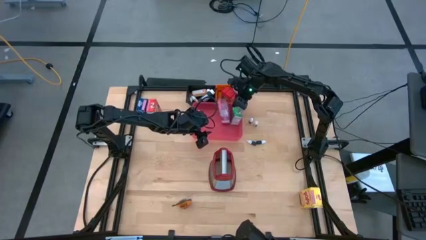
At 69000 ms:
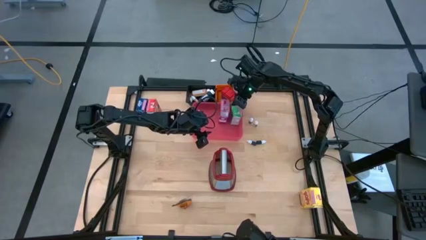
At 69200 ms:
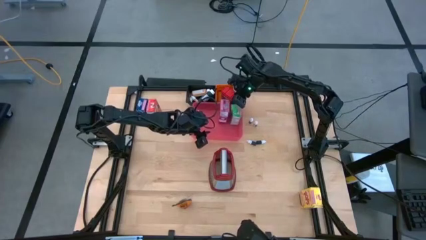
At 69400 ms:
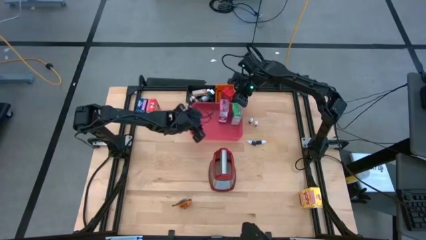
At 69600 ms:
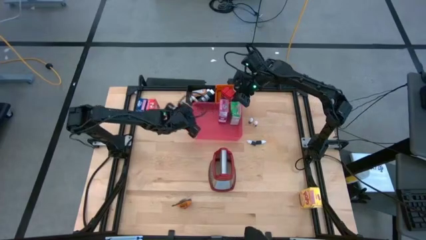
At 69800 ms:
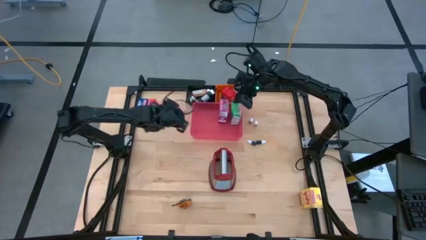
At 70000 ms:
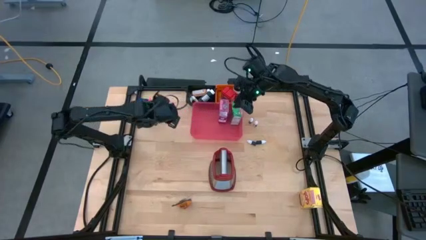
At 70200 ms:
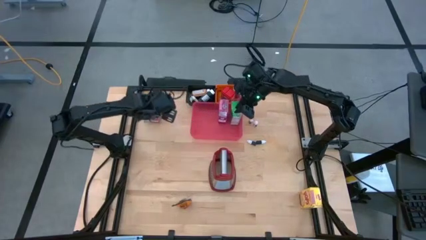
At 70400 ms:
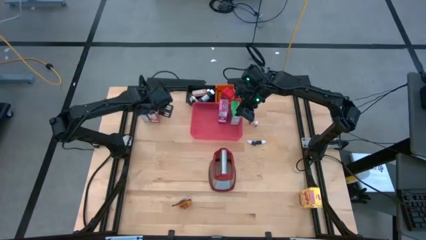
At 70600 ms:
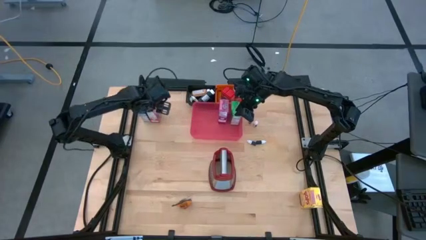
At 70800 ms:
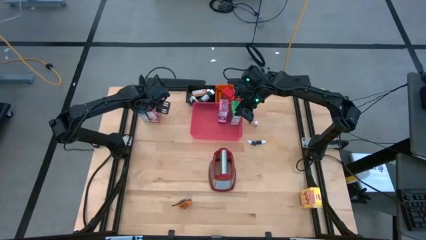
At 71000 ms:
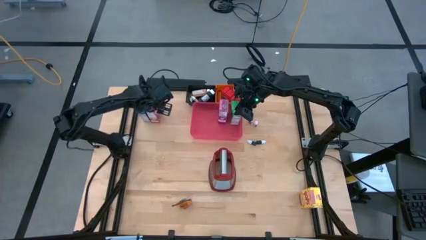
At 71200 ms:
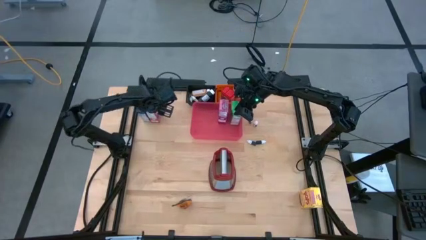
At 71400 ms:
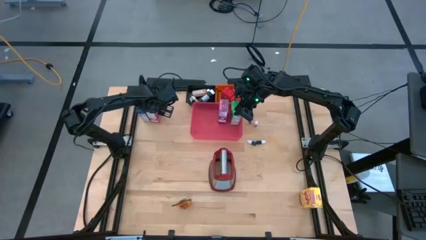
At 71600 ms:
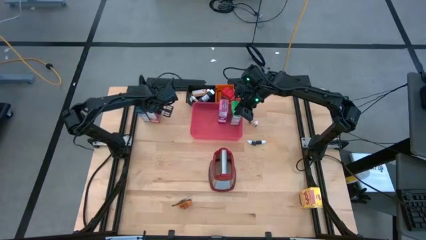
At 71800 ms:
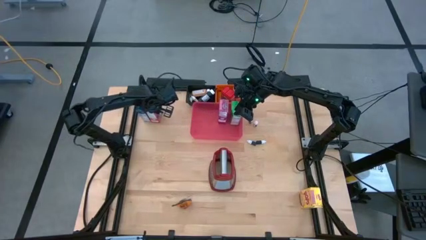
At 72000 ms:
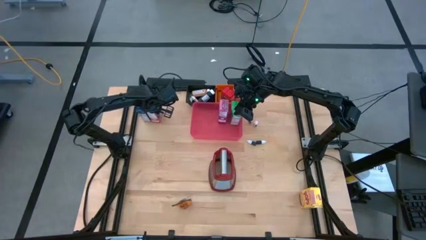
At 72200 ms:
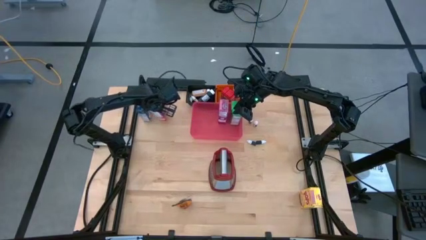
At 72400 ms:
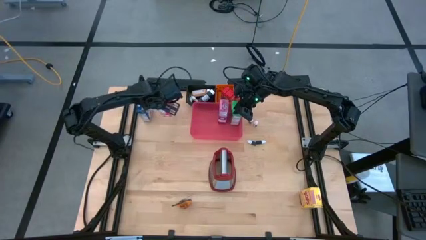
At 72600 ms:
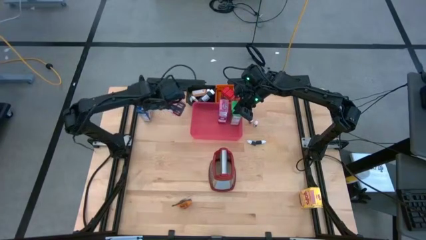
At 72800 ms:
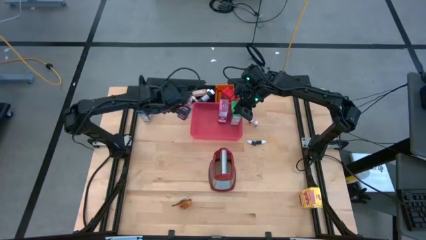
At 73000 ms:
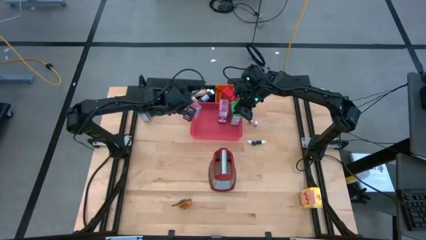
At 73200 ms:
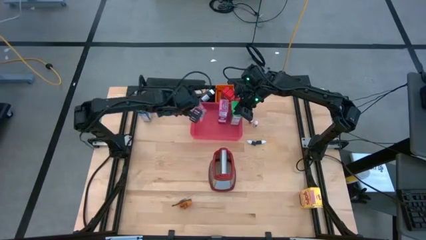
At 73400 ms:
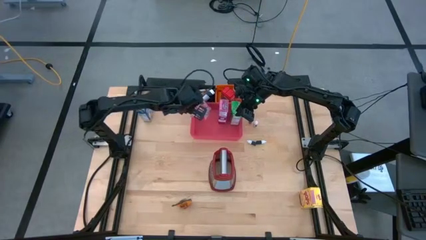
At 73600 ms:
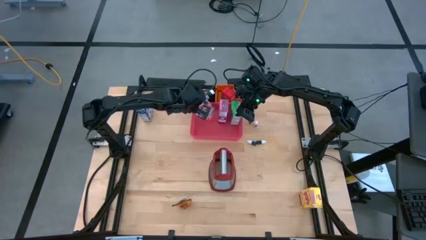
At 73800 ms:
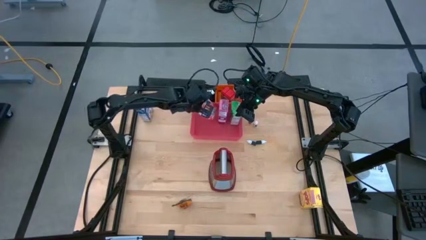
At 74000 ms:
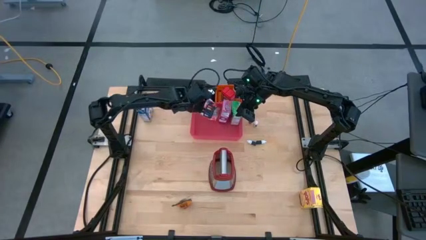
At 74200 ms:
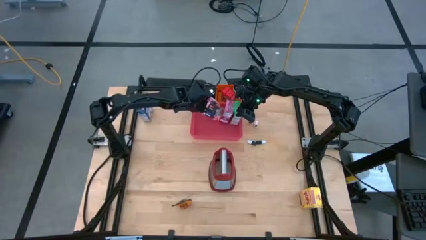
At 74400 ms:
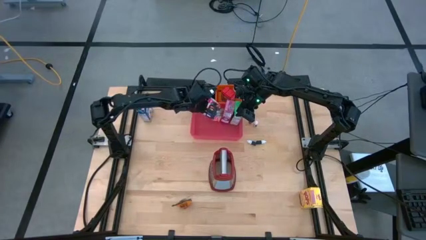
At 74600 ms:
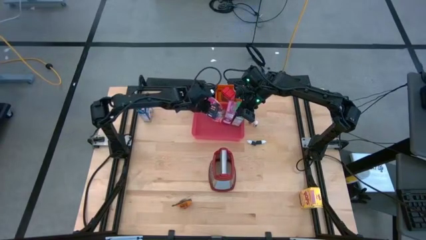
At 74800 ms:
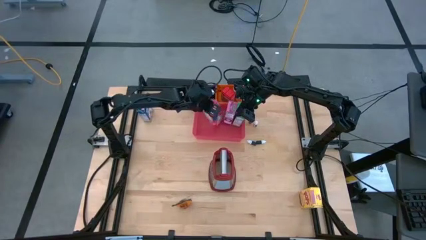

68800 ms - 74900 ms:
Task: Pick & Place Kitchen Items
Put the red cereal box into the pink bin

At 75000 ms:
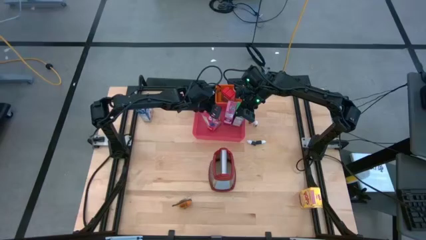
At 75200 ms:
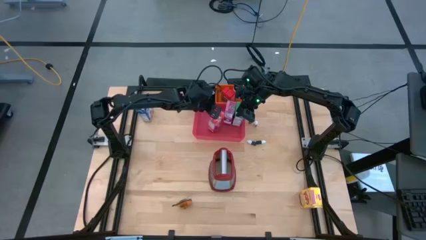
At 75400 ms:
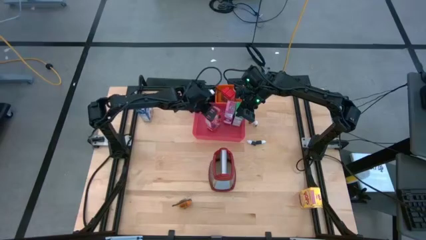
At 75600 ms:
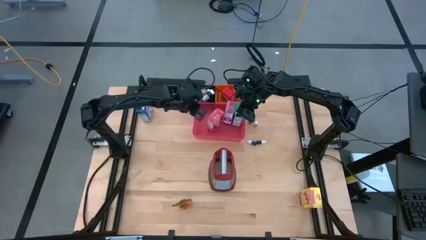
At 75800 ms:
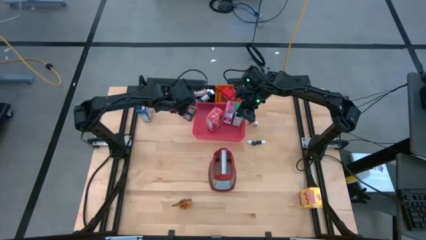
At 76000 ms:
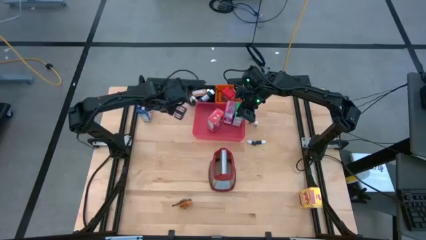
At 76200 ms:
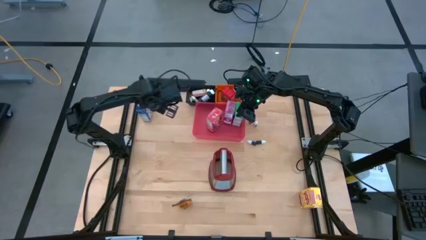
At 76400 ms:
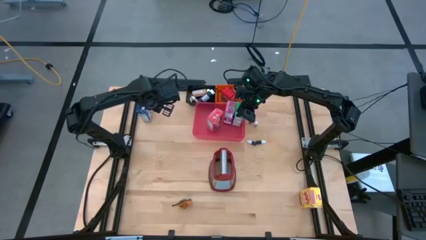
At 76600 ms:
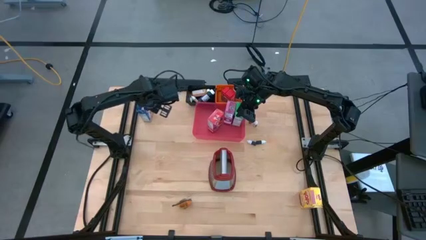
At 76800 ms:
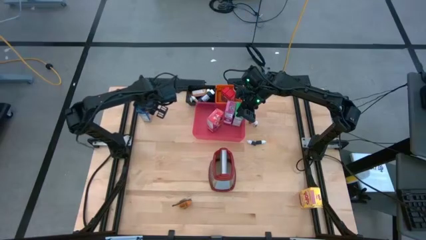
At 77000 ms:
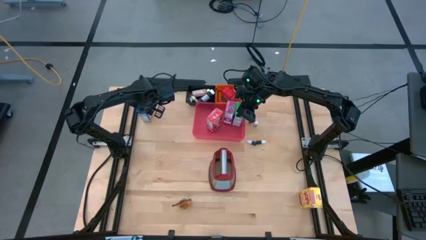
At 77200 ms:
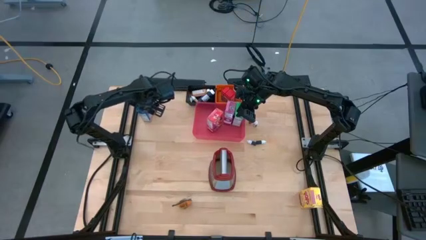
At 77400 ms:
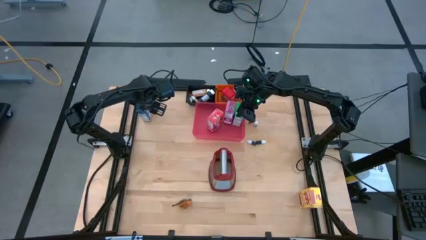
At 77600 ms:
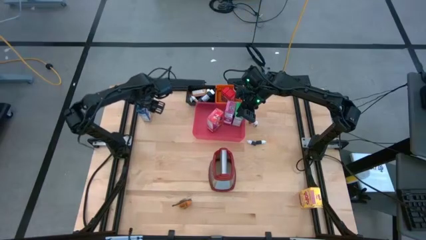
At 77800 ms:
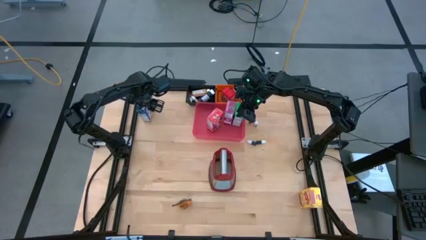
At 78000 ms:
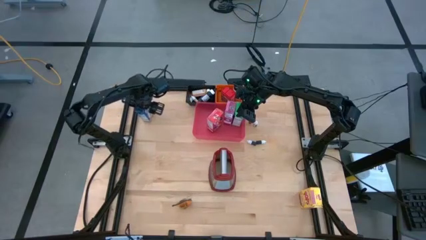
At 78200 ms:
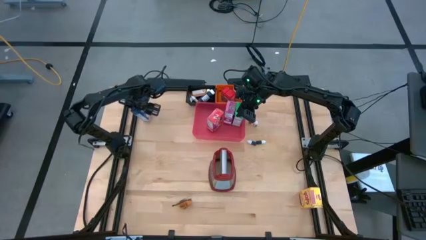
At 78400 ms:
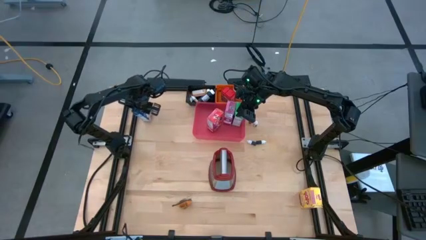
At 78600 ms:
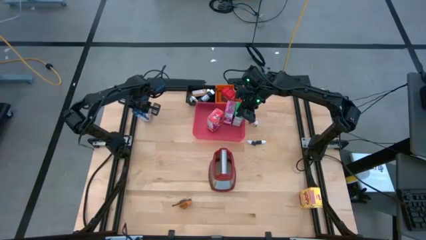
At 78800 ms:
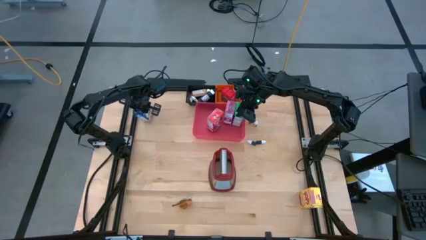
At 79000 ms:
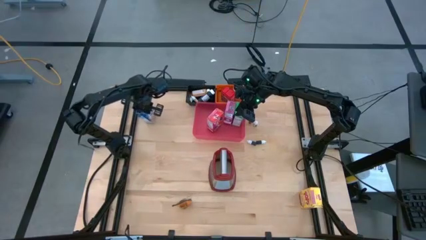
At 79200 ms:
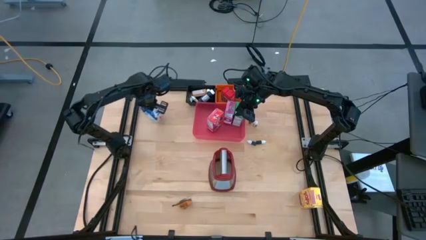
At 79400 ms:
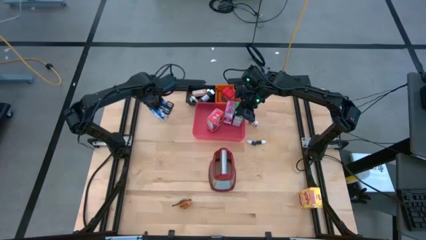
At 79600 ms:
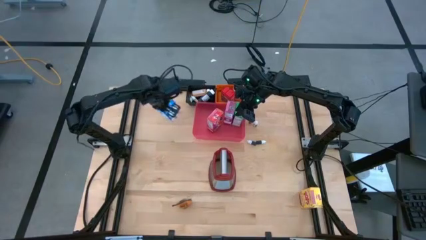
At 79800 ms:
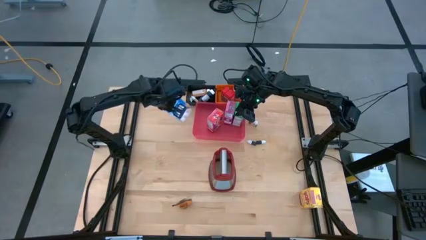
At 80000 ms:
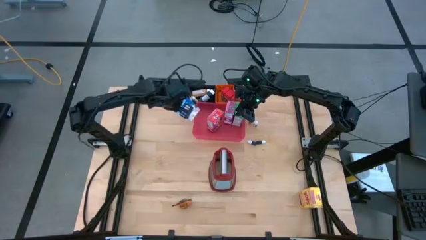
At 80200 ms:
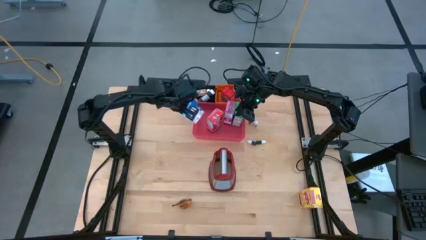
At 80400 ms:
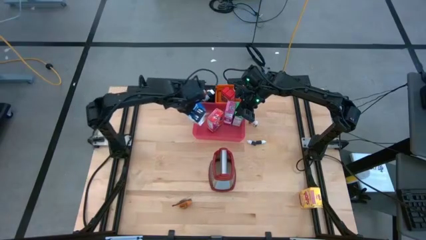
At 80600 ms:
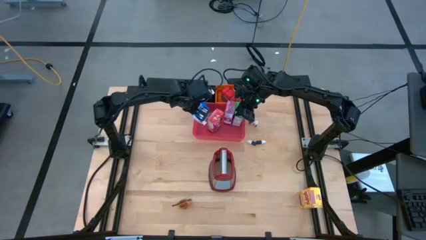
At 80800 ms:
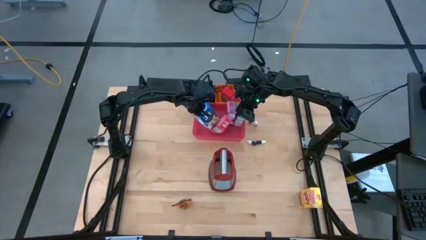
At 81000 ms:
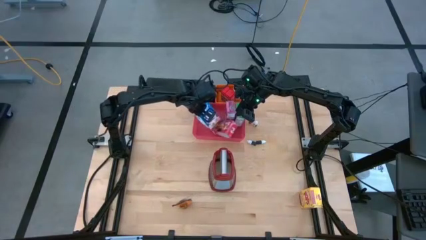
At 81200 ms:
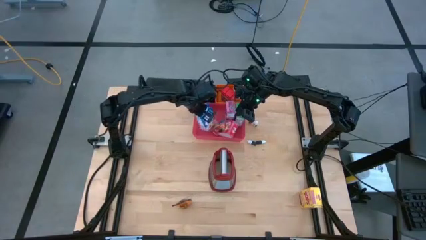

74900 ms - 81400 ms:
Put the blue cereal box into the pink bin

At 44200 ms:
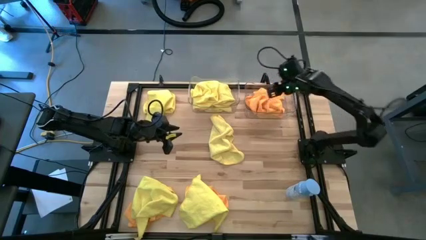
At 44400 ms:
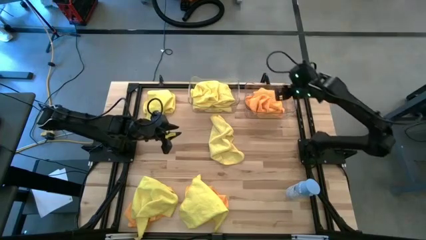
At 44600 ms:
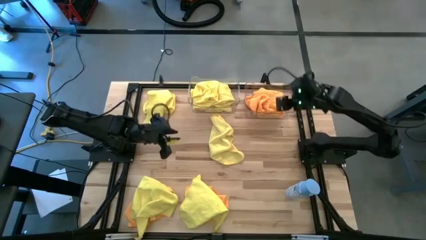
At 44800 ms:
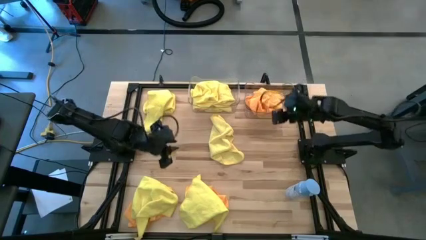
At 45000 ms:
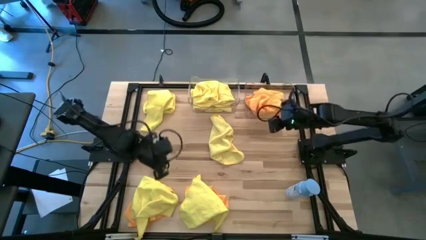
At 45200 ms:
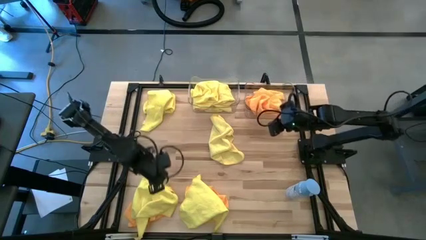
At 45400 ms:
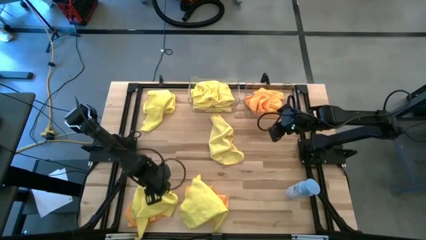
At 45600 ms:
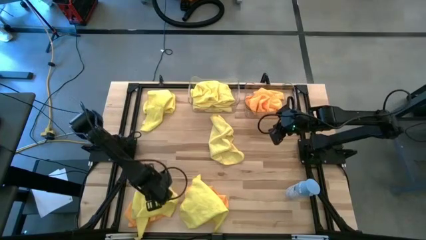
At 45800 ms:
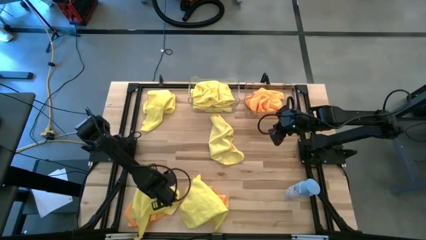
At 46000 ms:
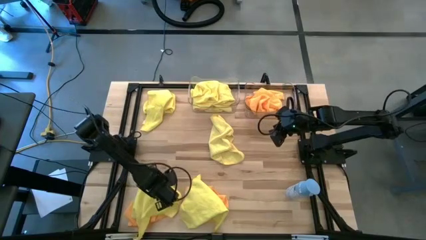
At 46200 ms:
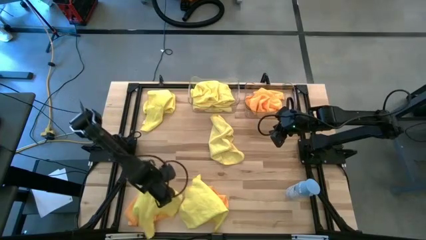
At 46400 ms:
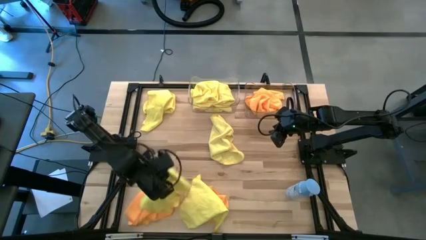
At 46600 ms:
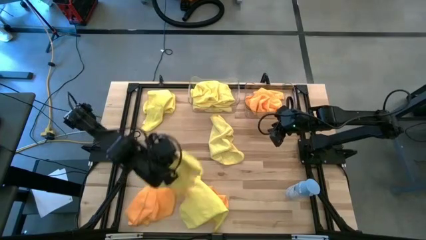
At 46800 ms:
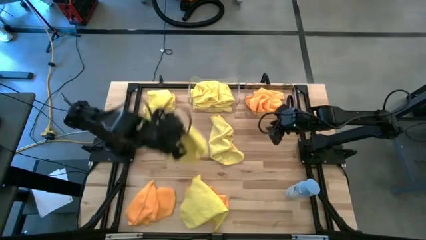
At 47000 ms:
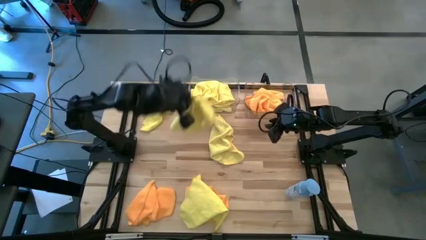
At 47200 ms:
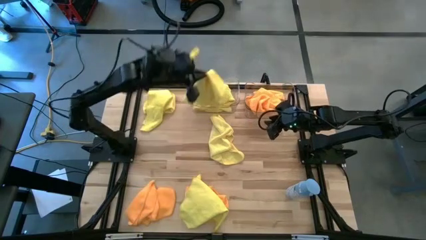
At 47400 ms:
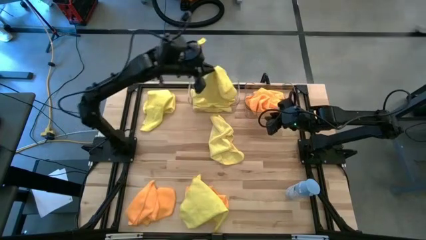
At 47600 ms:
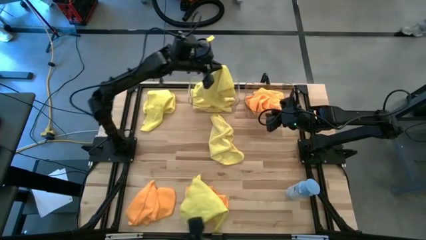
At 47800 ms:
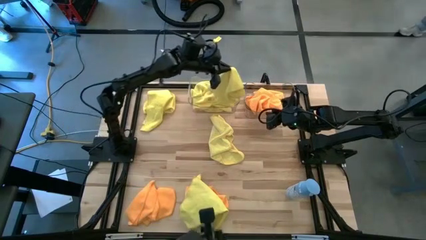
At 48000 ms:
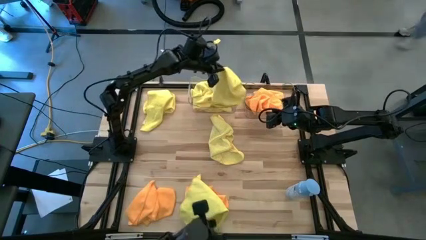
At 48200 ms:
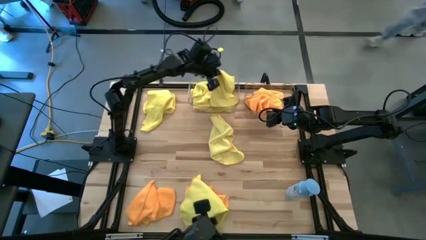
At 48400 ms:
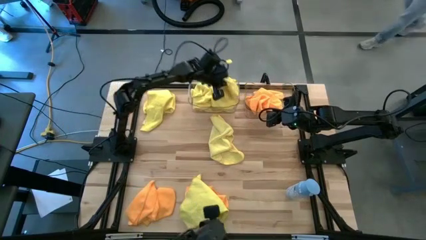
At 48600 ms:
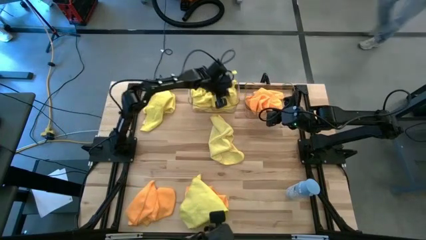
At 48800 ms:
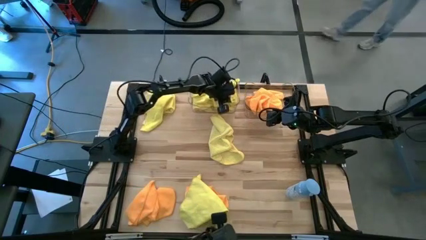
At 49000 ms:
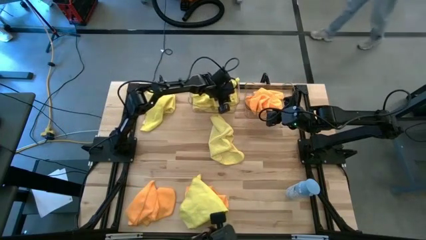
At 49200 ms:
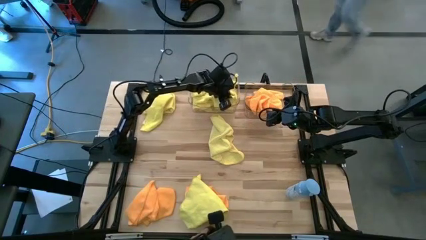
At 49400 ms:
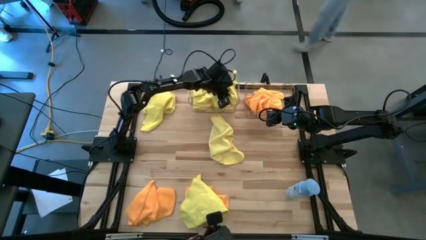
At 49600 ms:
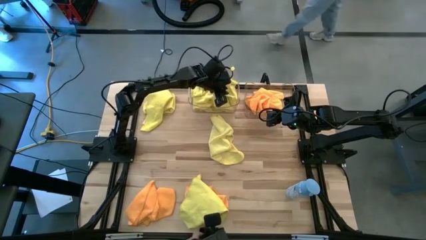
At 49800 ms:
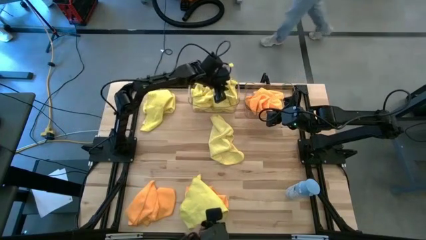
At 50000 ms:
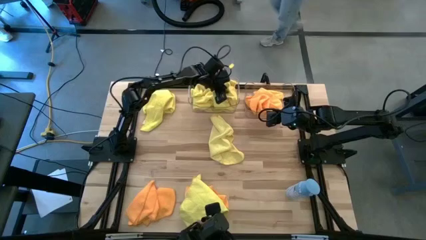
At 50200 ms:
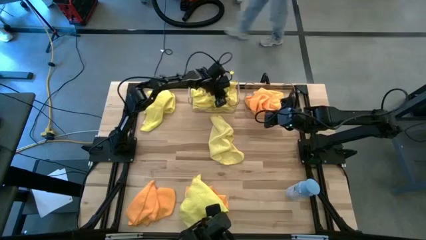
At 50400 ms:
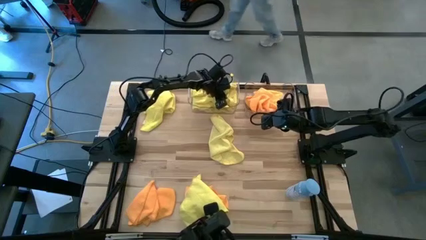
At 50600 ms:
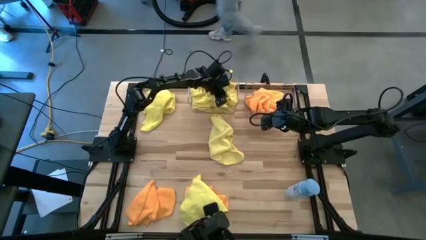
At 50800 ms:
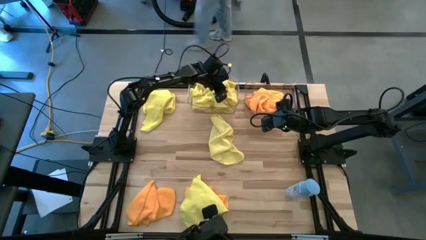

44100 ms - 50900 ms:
Task: Sort microfiber towel by color & place in baskets
Put the yellow microfiber cloth into the left transparent bin
